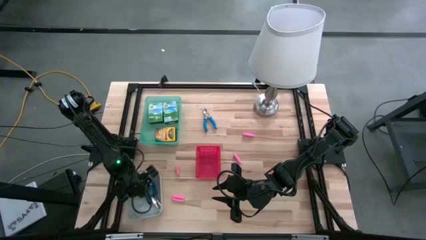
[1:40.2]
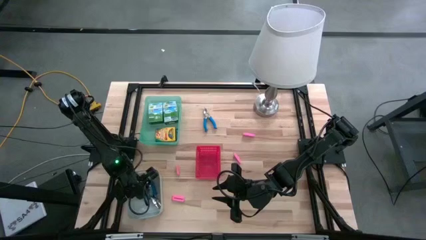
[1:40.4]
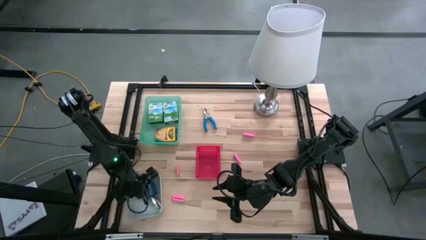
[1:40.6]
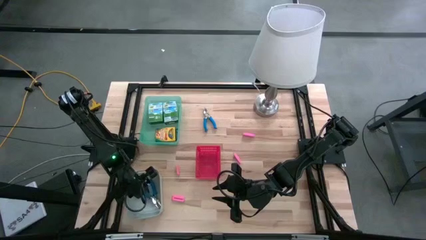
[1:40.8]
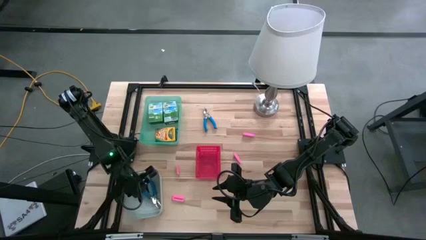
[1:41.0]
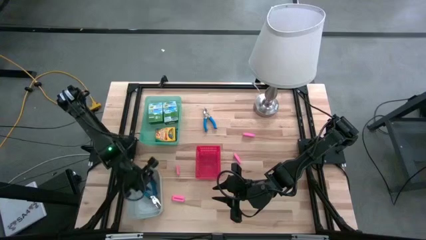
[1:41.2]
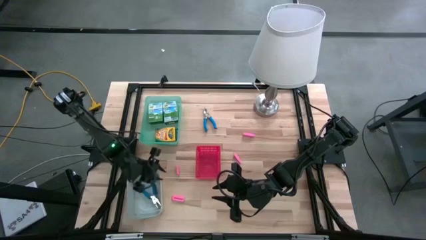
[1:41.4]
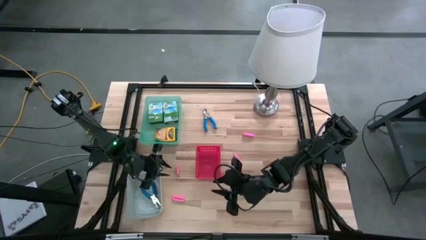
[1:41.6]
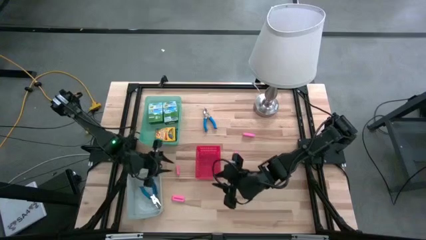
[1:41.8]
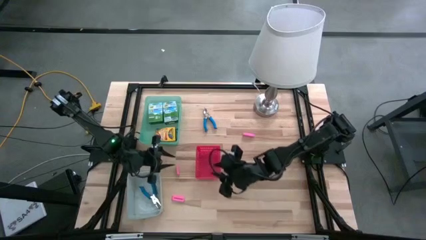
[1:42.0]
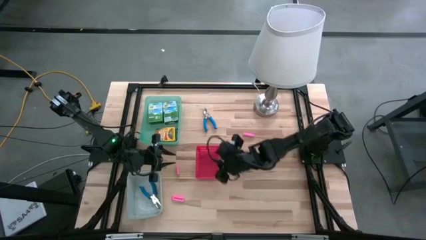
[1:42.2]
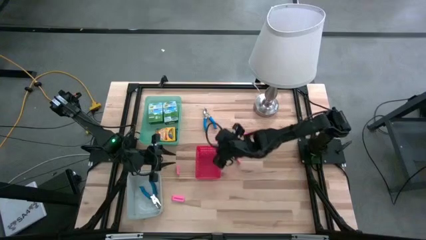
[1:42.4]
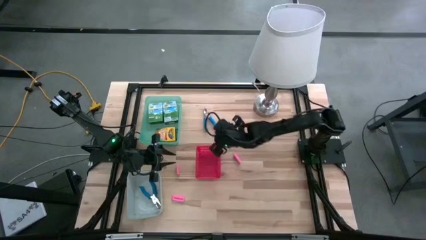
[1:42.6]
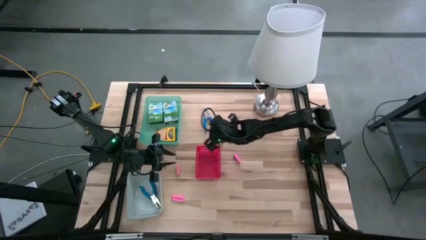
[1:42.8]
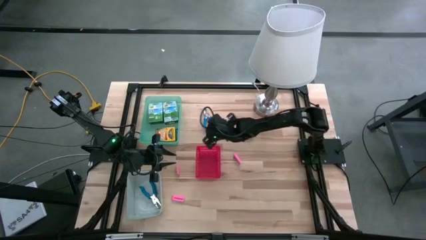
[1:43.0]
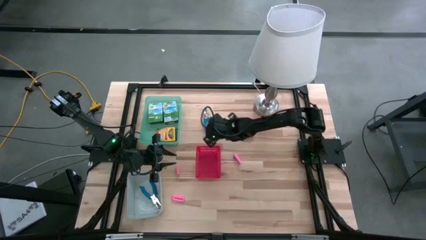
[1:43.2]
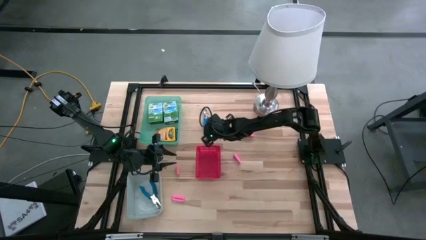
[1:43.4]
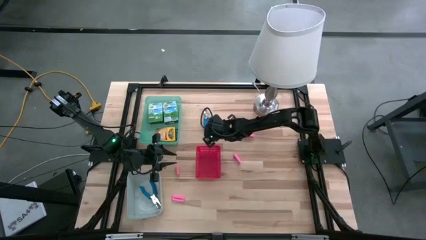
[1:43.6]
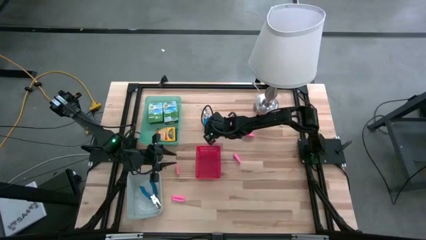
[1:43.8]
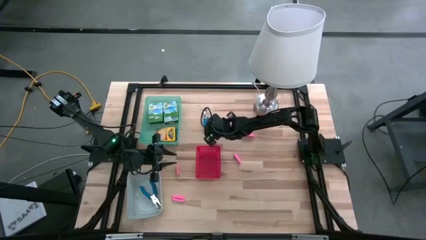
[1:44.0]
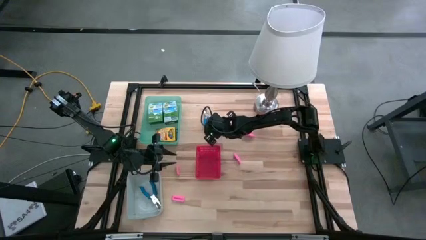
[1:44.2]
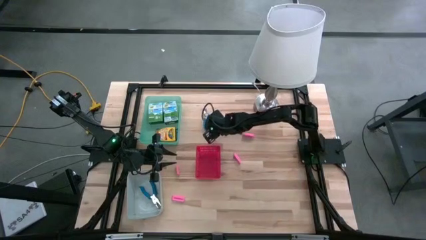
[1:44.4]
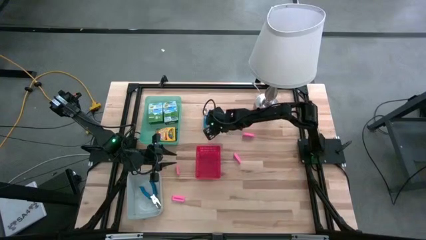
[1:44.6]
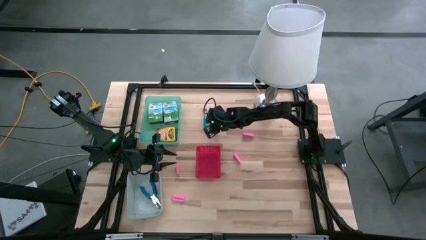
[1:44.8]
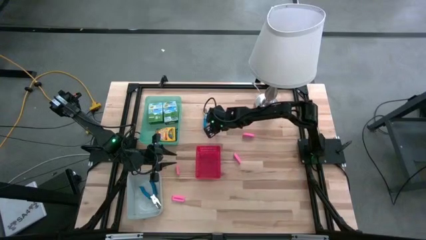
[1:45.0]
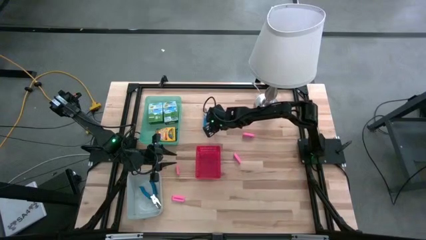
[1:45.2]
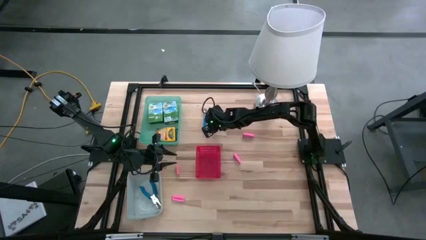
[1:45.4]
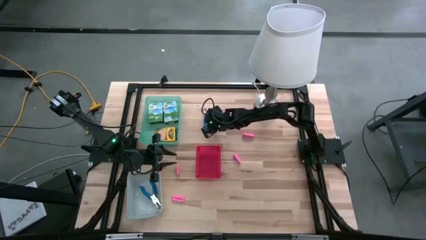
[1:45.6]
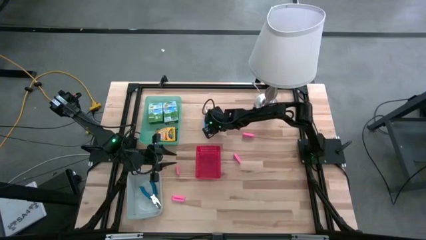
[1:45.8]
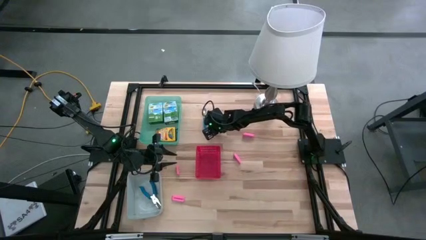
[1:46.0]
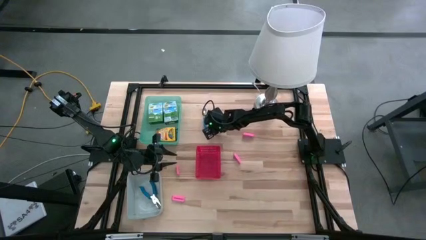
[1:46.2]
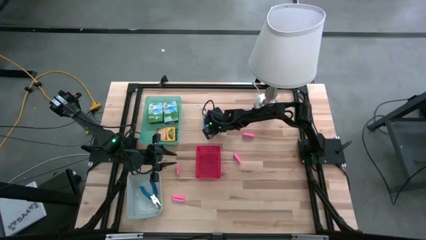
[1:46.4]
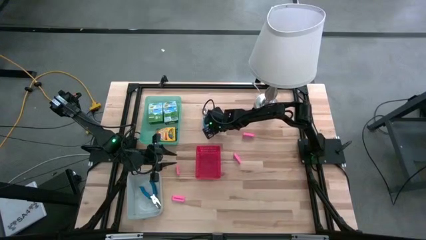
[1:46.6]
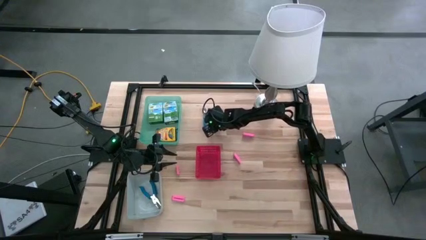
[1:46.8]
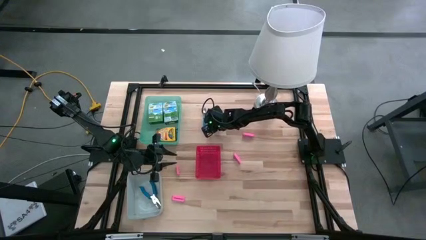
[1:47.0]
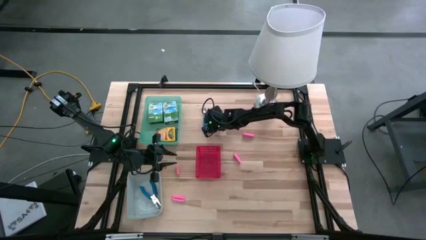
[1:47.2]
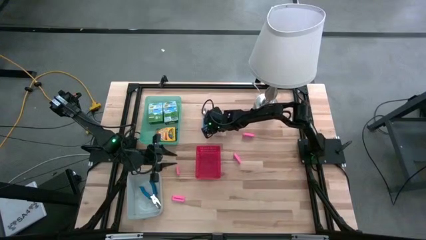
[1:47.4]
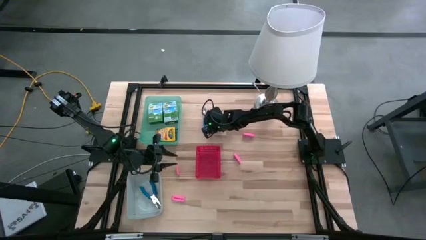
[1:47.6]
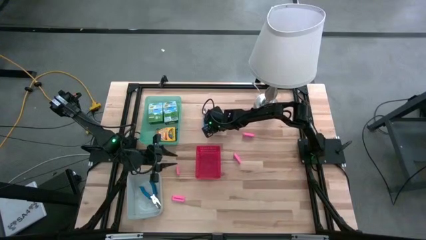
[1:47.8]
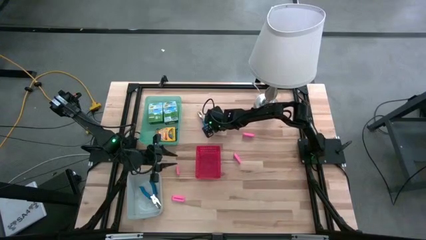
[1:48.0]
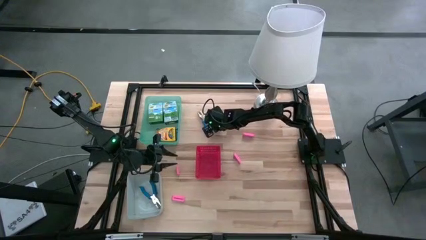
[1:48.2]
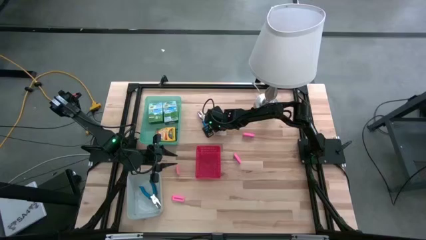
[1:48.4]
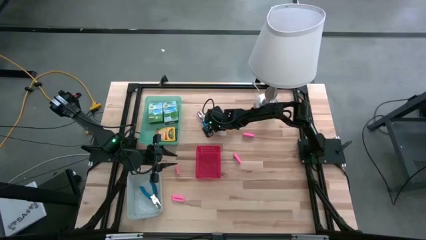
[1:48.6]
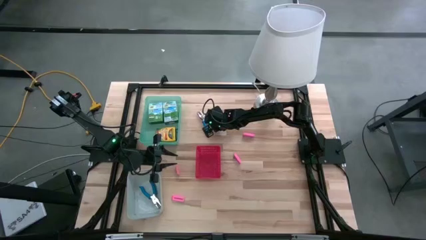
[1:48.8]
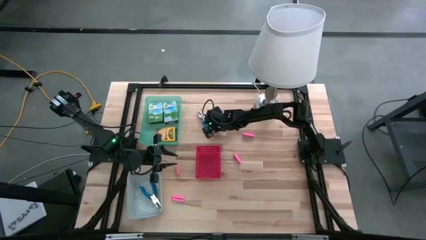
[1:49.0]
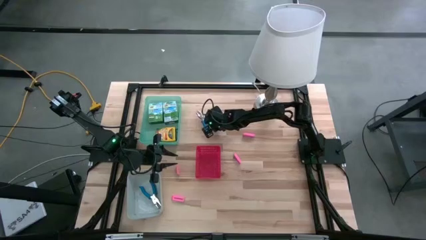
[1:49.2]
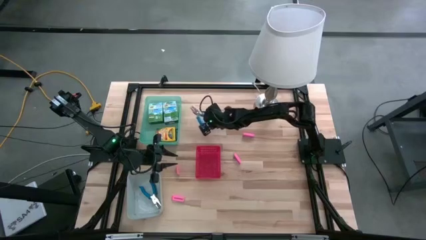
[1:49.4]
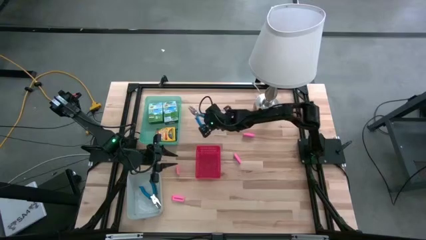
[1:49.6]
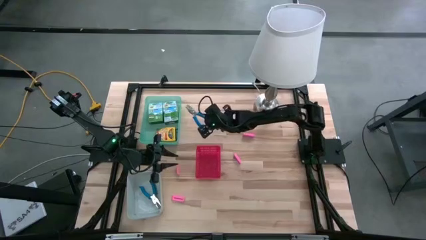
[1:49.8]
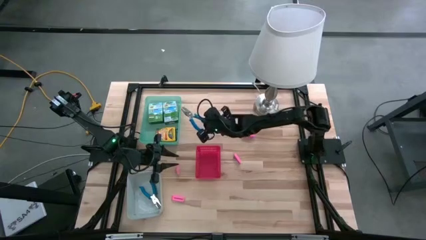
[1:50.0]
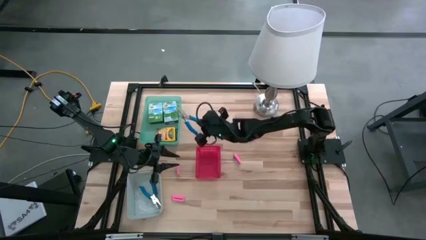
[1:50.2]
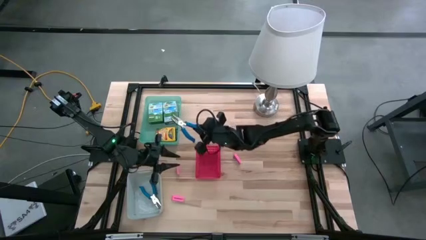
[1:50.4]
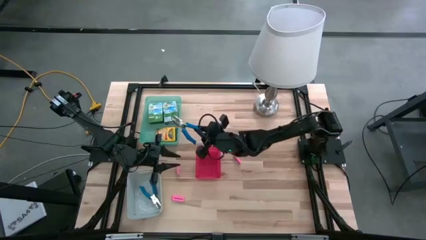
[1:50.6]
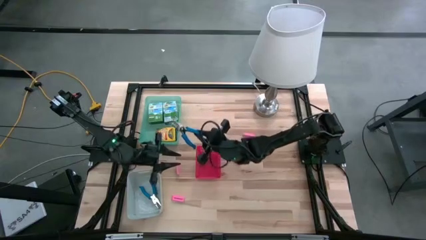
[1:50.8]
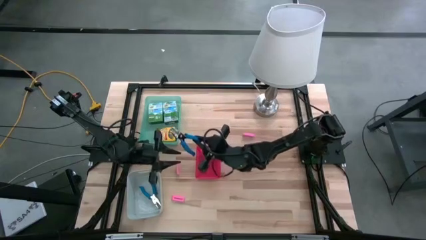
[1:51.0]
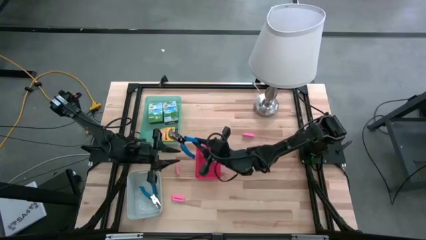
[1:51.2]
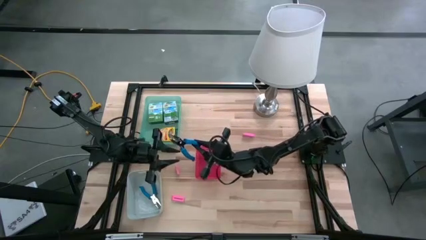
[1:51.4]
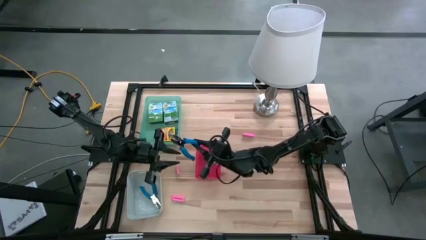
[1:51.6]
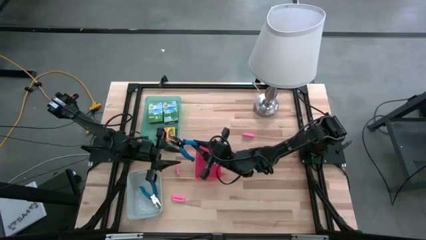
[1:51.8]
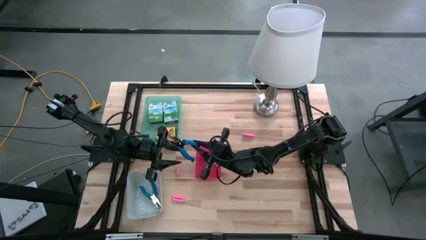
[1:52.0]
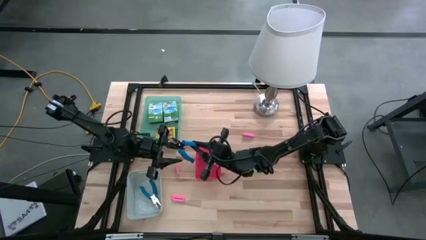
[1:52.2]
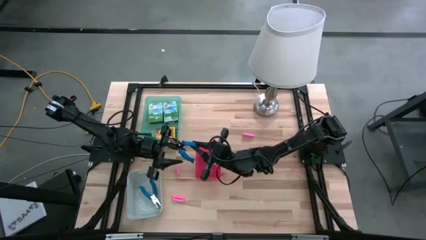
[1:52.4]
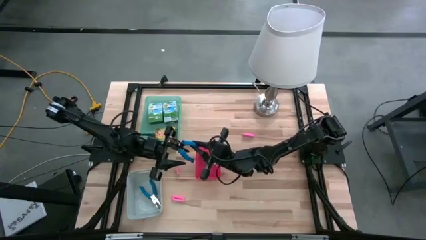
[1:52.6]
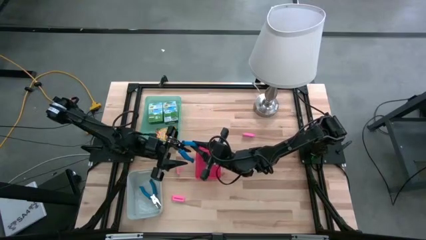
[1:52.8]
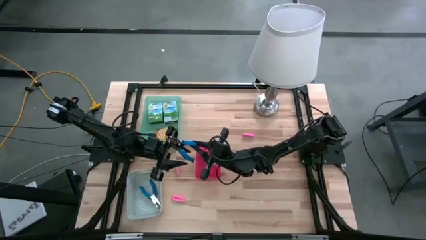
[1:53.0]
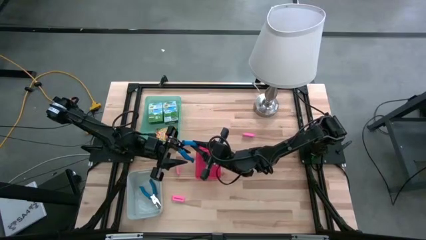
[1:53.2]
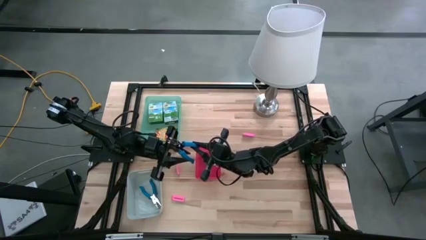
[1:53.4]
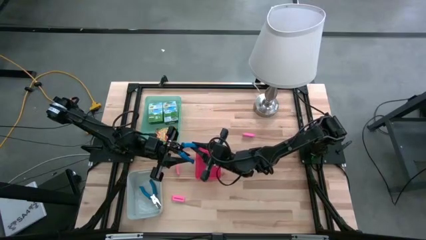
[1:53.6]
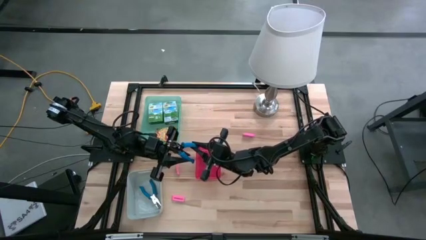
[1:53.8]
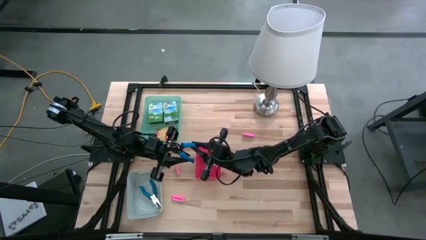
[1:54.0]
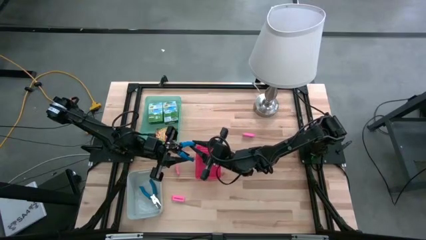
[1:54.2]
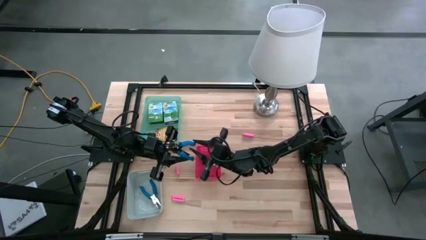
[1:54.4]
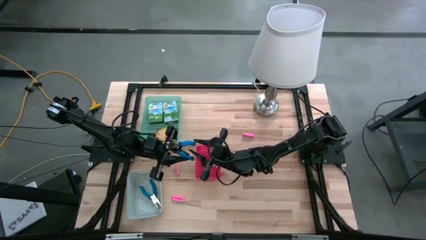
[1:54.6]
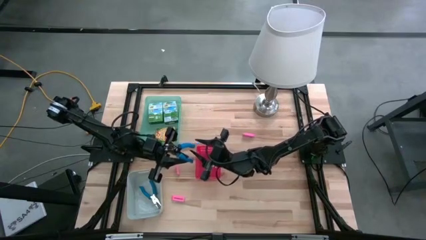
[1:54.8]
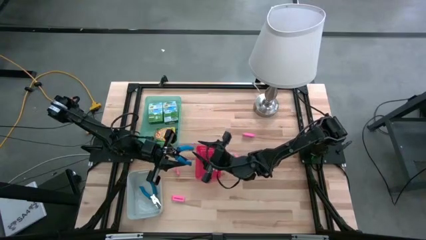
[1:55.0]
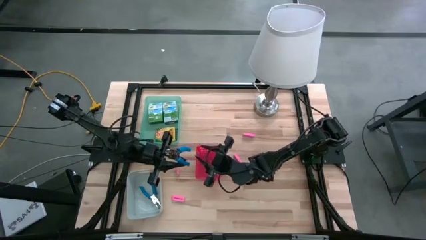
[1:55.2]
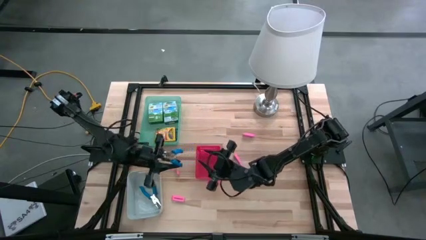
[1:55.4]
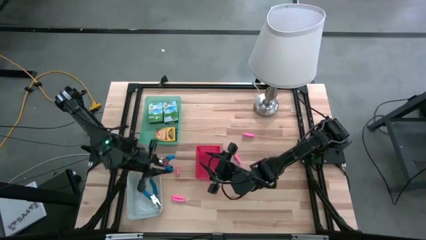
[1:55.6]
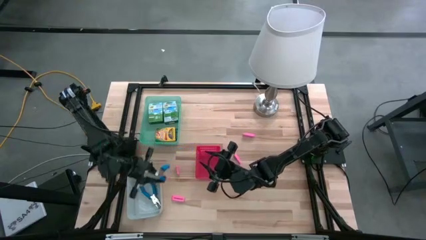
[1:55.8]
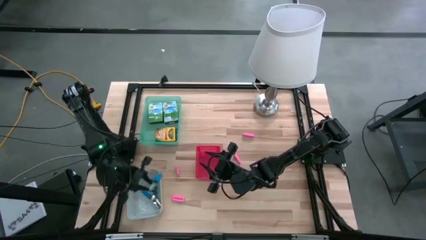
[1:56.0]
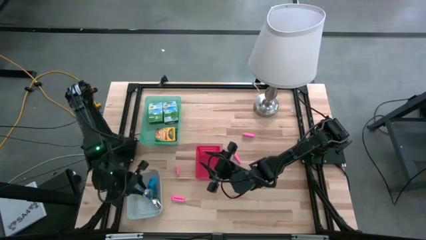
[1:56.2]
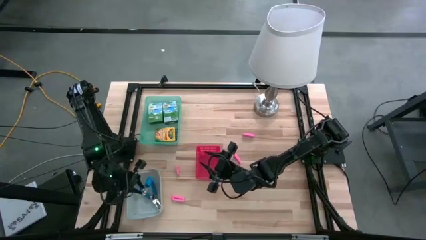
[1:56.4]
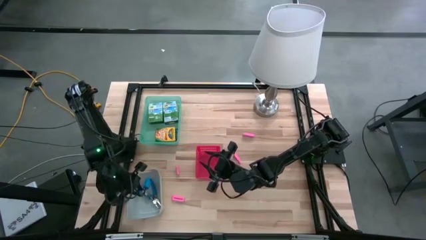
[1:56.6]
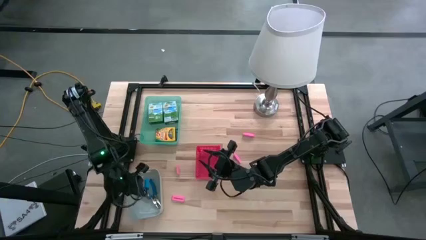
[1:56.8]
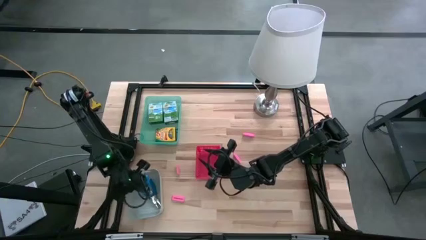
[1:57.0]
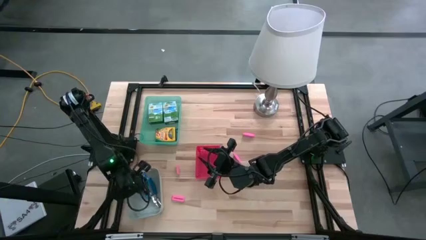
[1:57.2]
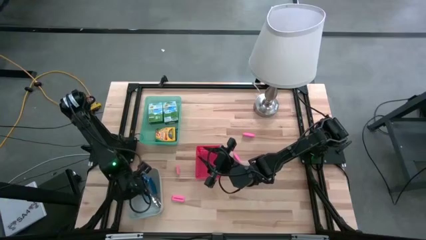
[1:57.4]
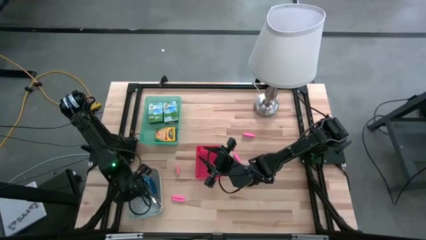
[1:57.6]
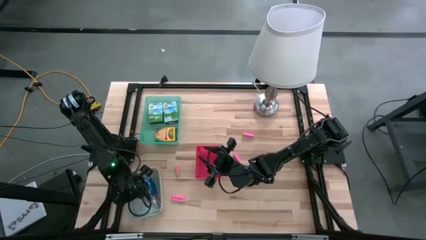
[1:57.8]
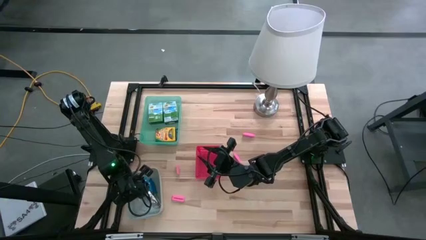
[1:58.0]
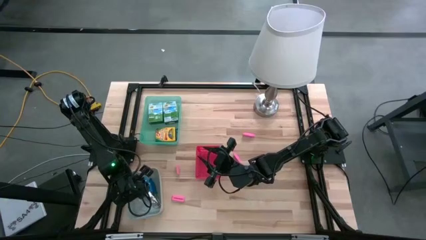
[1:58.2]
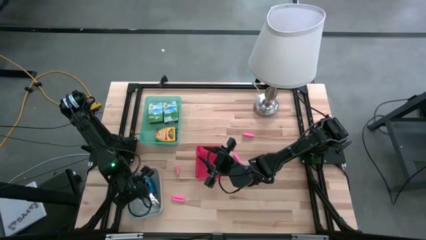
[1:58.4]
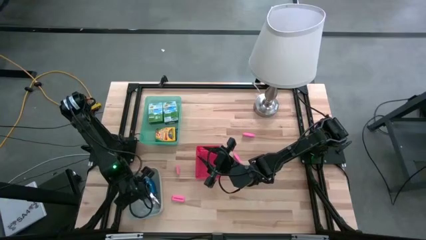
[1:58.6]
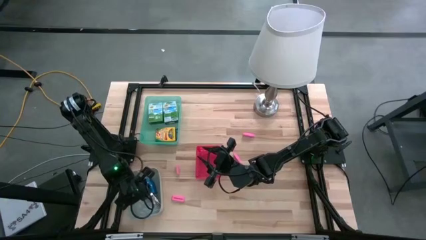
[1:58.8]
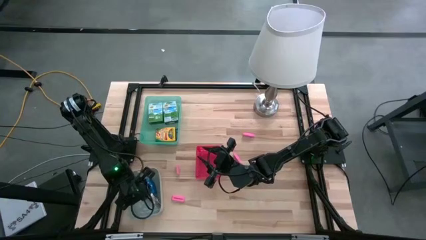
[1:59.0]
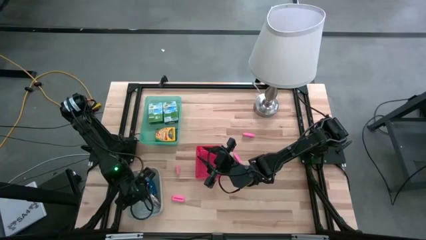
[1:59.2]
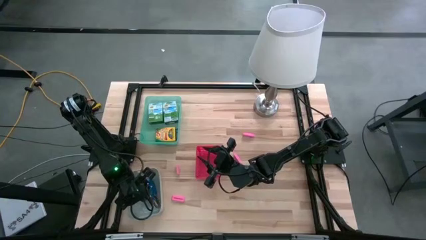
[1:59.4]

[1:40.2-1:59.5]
Task: Pick & Place School Supplies
Put the blue hole puncher into the grey bin
